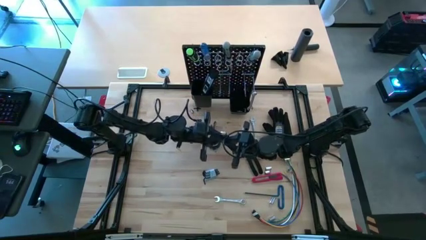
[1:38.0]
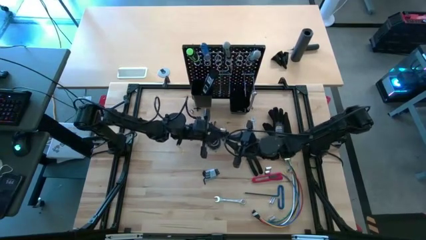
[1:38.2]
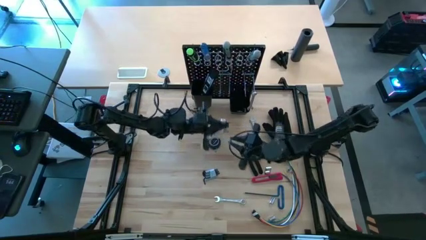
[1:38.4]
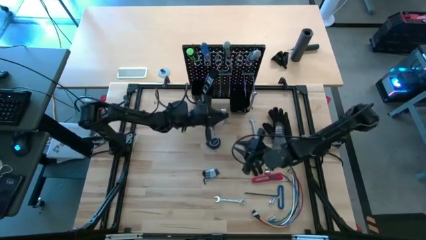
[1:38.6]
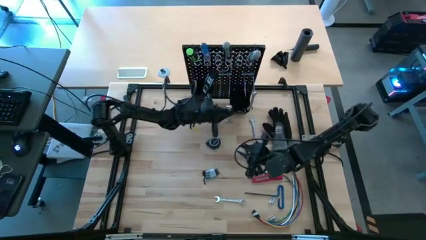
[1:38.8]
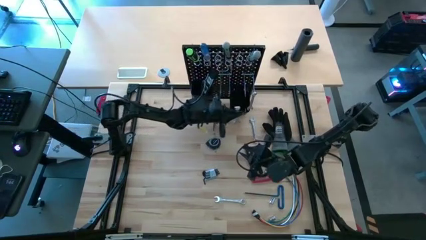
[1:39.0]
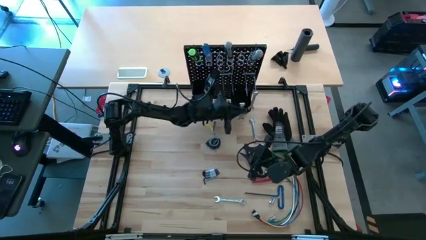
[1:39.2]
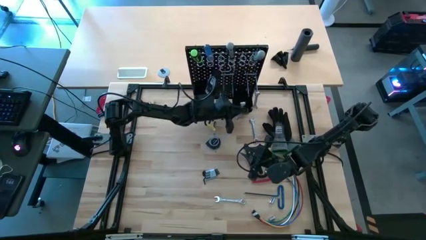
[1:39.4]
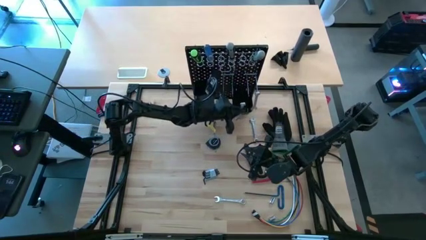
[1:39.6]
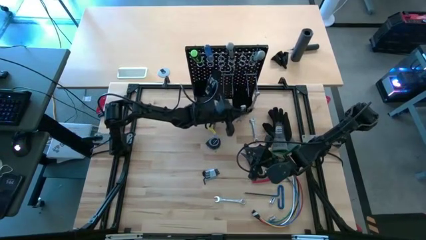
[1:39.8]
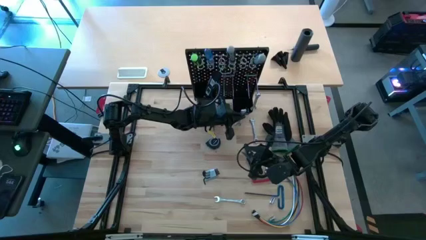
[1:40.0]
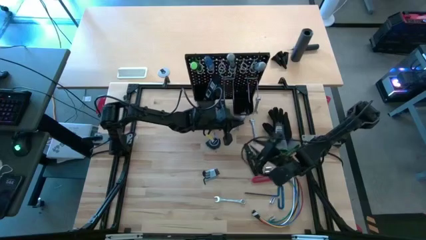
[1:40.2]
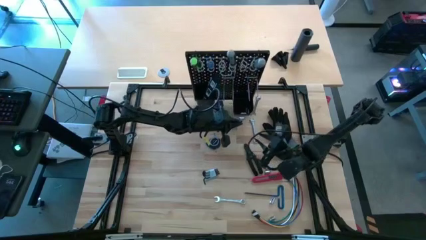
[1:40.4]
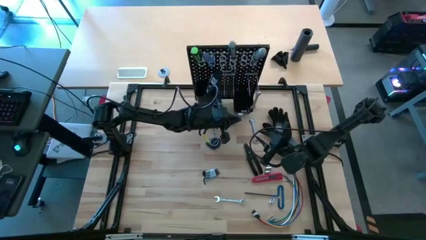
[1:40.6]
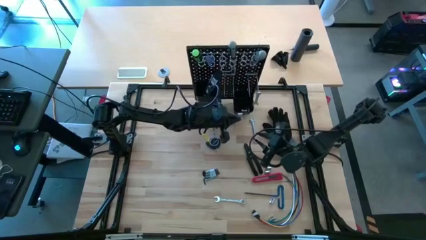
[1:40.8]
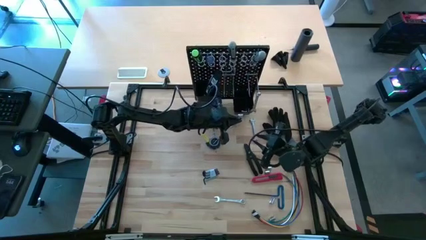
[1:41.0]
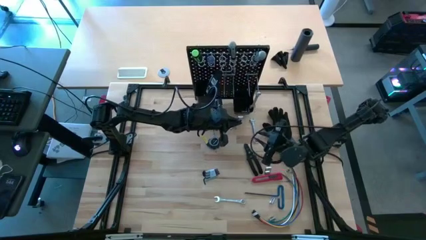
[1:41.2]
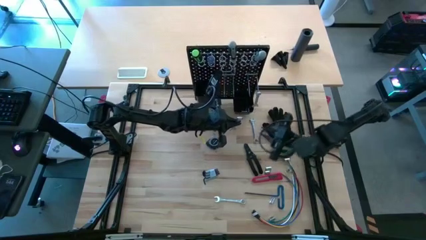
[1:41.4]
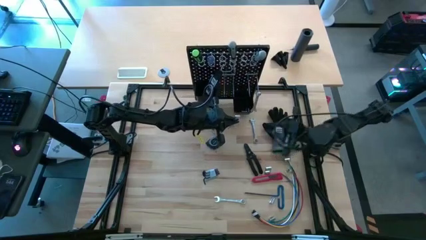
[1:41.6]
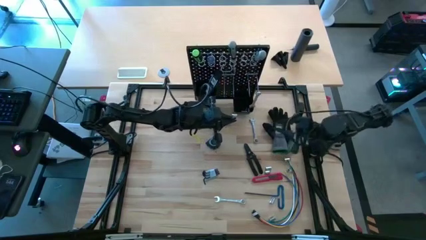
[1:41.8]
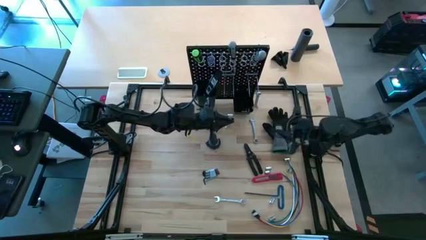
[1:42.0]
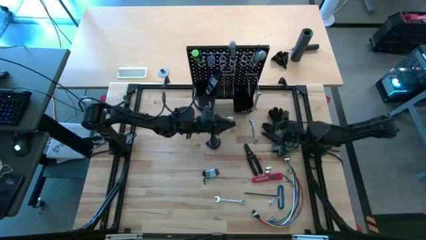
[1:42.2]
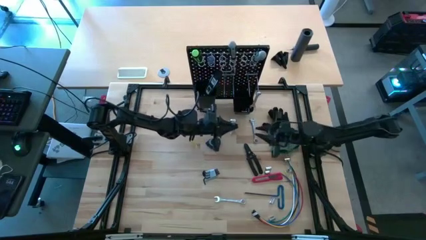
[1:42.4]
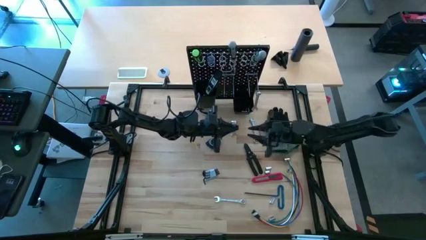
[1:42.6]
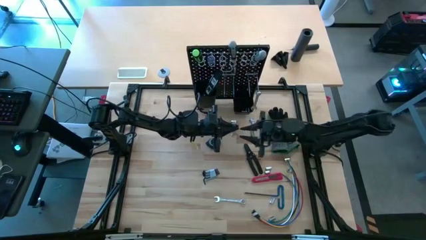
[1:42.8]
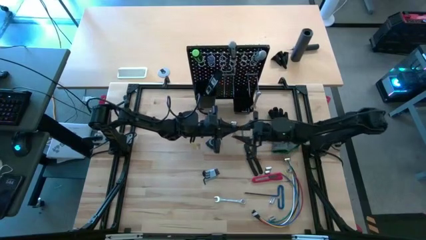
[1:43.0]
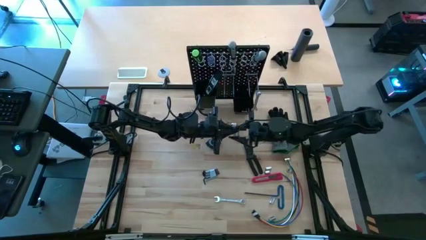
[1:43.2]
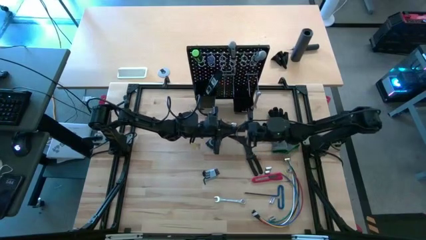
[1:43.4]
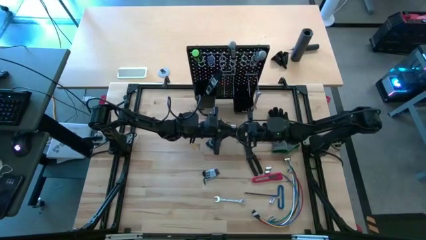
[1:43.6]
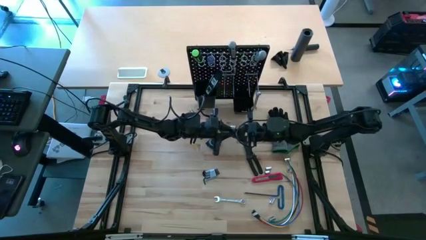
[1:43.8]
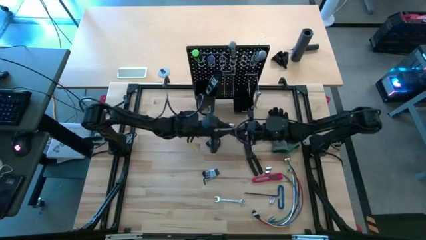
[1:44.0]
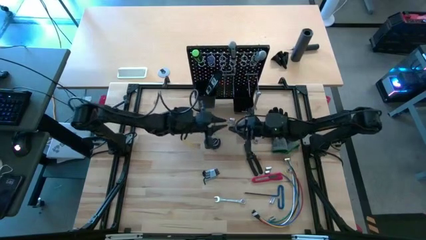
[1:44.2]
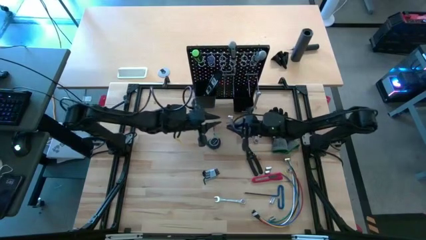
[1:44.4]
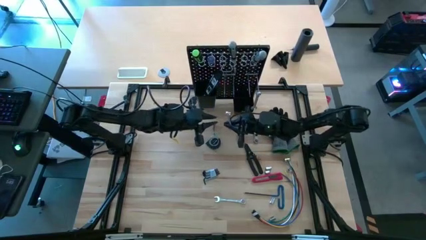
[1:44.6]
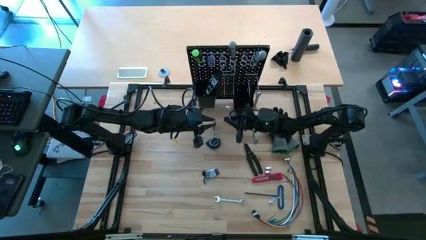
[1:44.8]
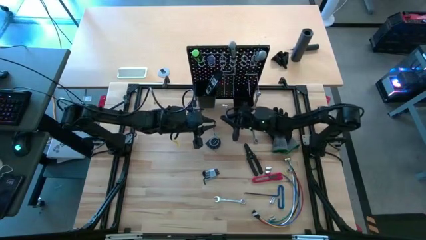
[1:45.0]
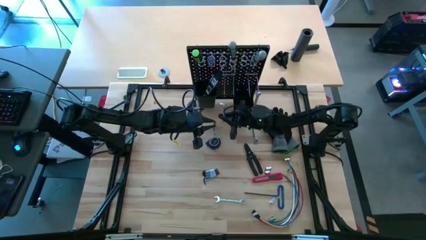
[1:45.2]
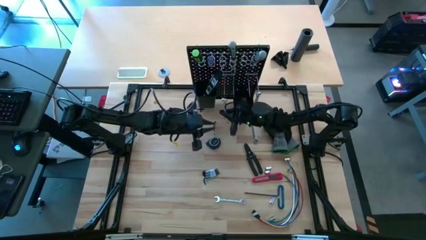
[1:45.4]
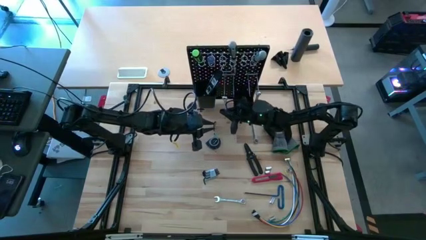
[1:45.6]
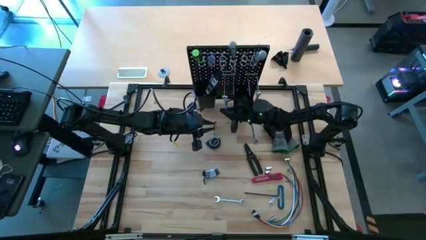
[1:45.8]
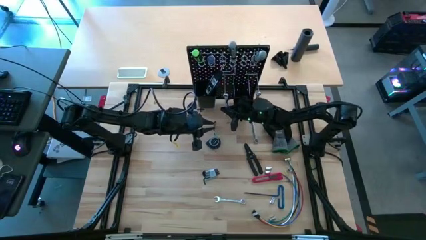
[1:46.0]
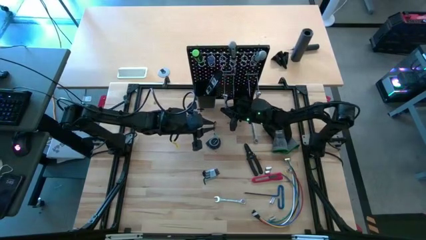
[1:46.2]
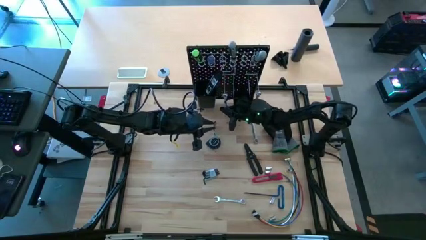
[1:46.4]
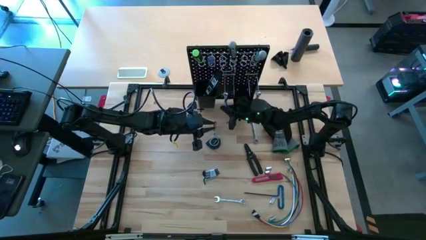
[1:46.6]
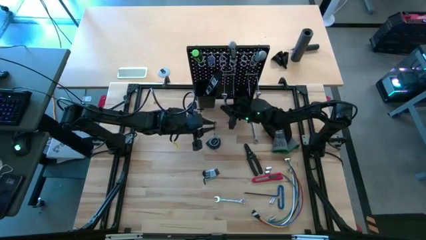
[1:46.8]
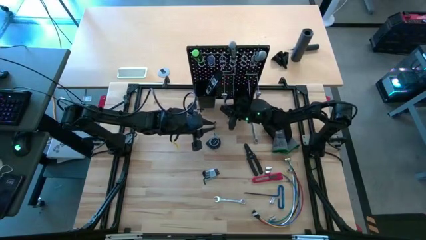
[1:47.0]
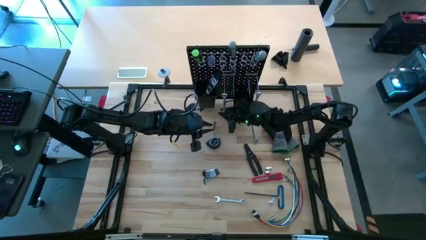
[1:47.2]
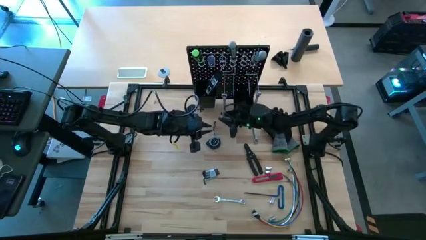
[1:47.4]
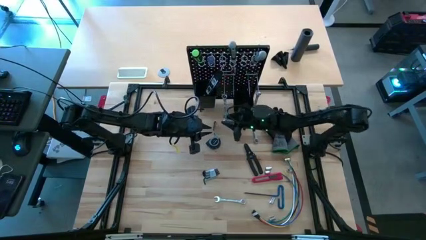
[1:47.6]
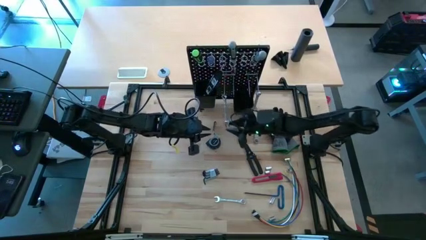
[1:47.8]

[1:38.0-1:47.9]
Task: Hang tools onto peg board
Hang the silver wrench on the peg board
